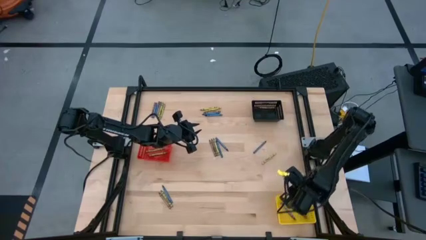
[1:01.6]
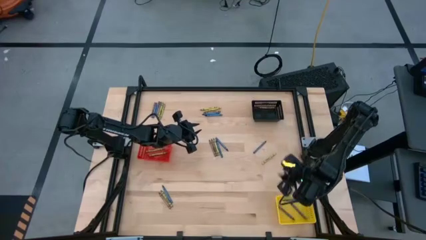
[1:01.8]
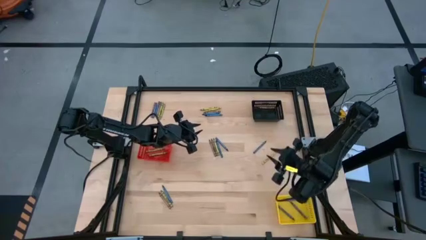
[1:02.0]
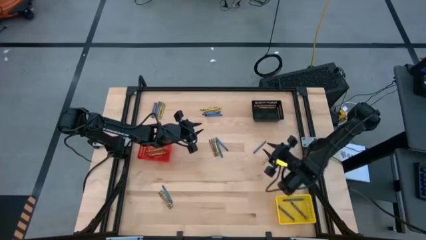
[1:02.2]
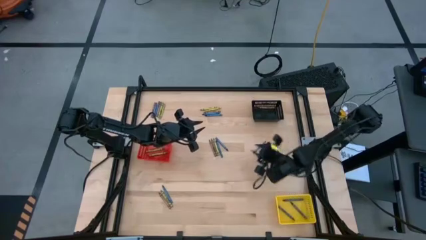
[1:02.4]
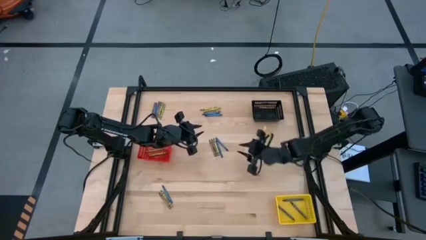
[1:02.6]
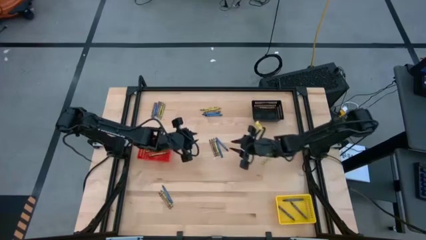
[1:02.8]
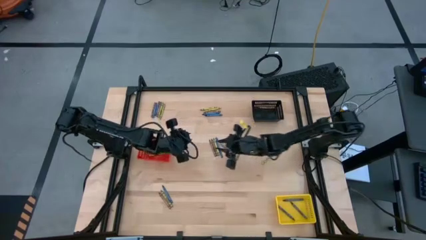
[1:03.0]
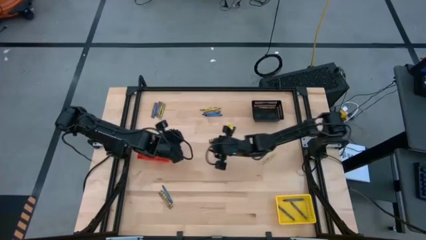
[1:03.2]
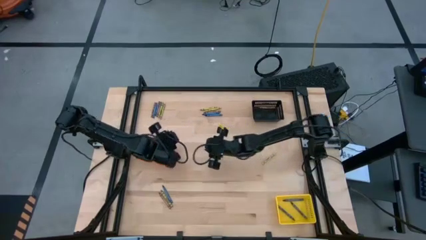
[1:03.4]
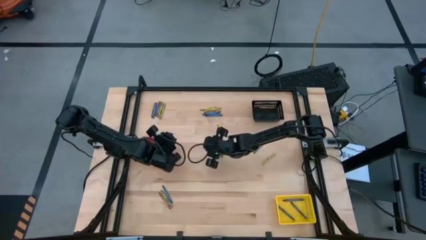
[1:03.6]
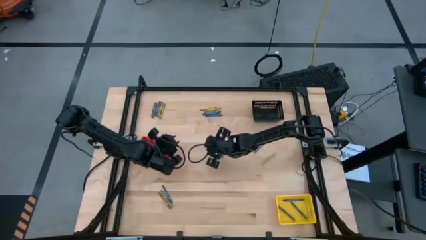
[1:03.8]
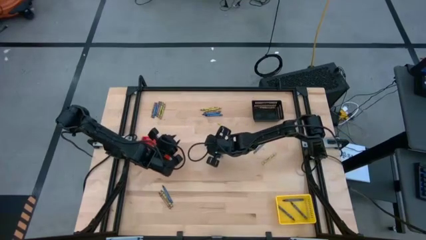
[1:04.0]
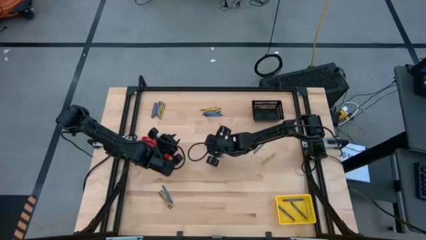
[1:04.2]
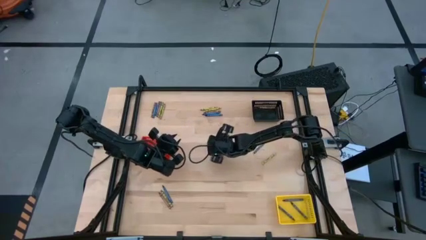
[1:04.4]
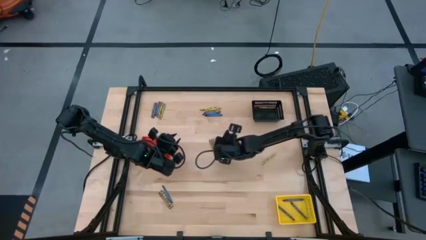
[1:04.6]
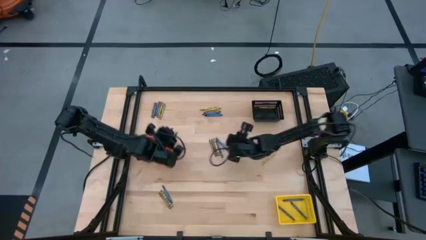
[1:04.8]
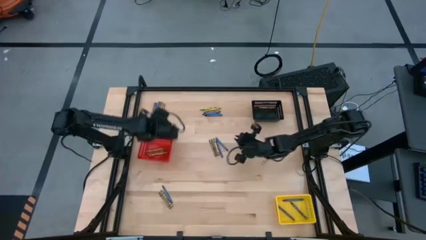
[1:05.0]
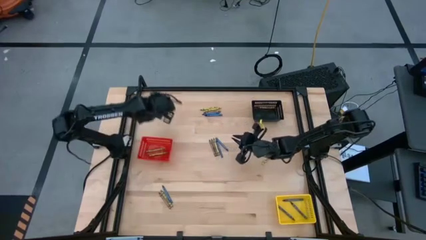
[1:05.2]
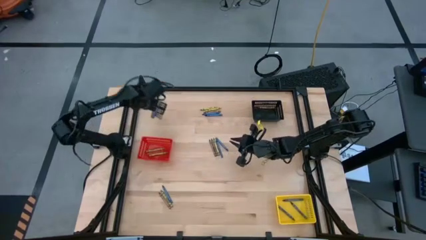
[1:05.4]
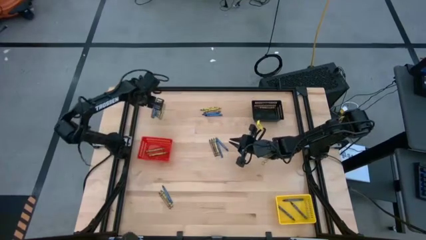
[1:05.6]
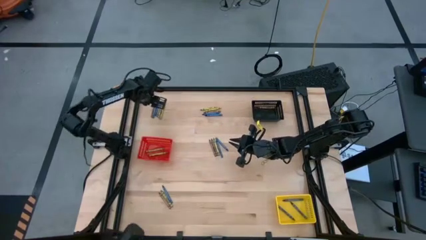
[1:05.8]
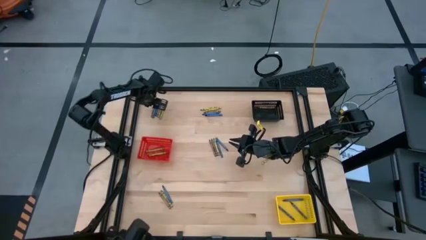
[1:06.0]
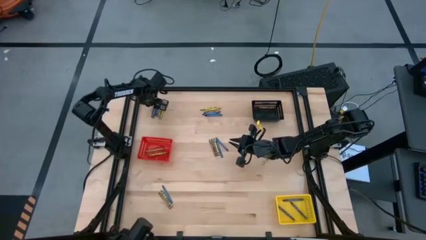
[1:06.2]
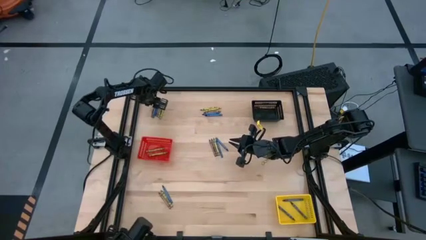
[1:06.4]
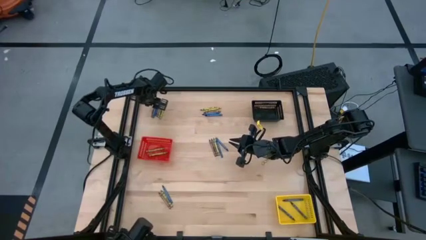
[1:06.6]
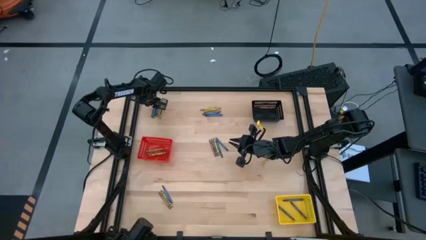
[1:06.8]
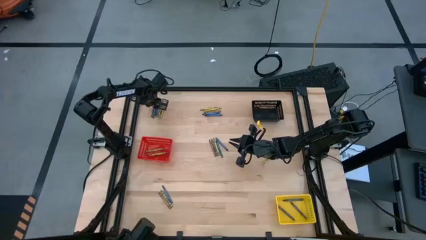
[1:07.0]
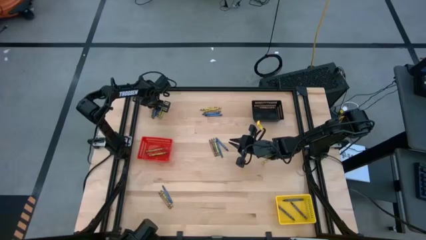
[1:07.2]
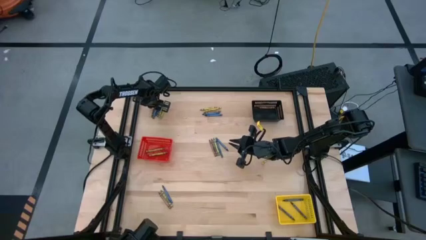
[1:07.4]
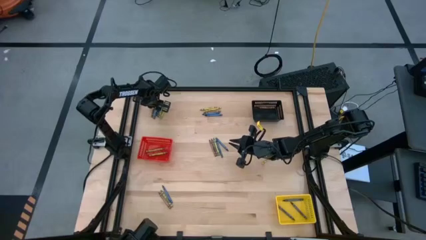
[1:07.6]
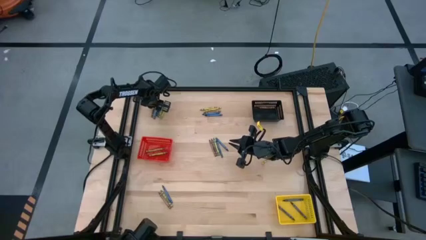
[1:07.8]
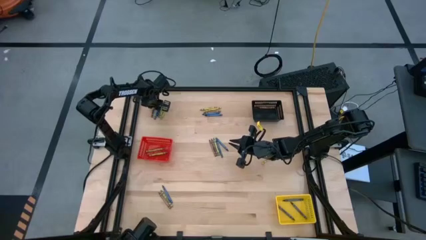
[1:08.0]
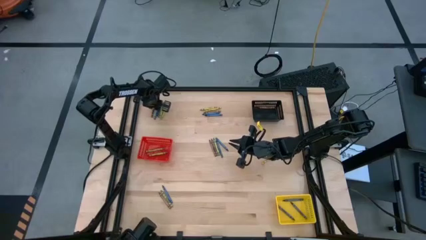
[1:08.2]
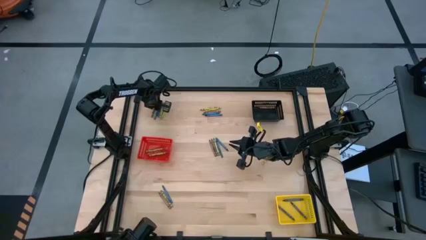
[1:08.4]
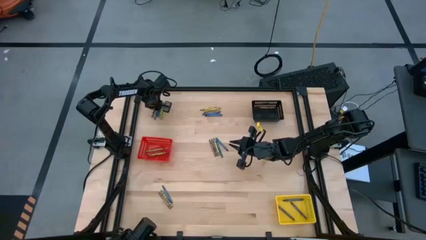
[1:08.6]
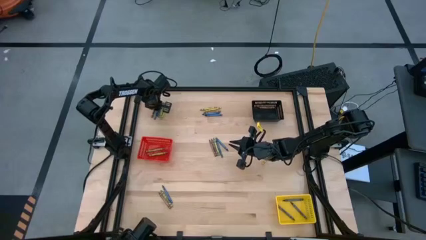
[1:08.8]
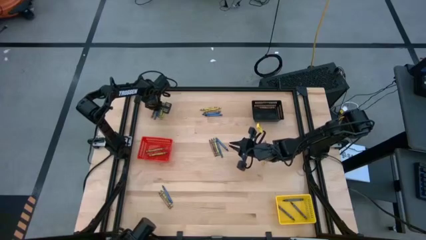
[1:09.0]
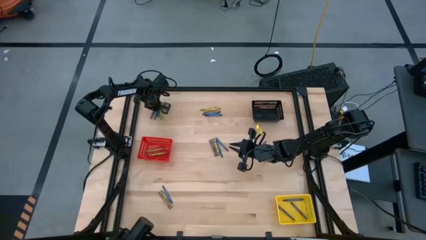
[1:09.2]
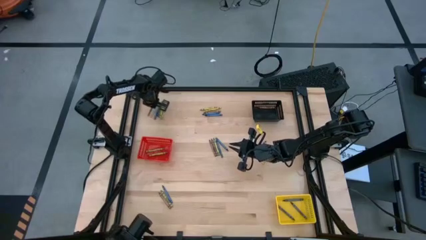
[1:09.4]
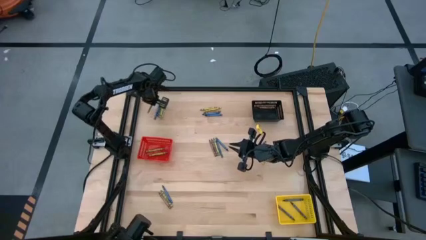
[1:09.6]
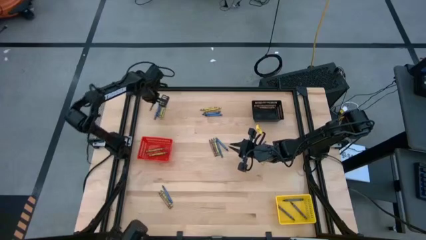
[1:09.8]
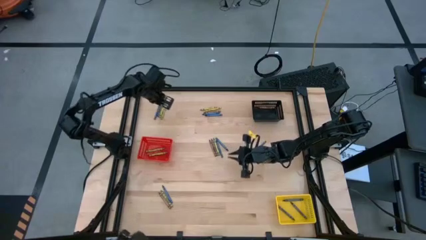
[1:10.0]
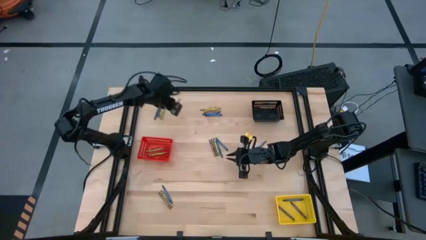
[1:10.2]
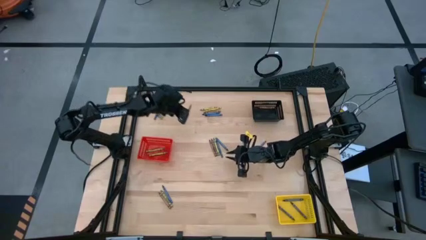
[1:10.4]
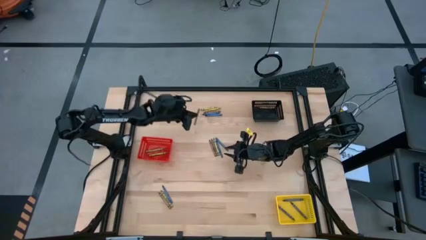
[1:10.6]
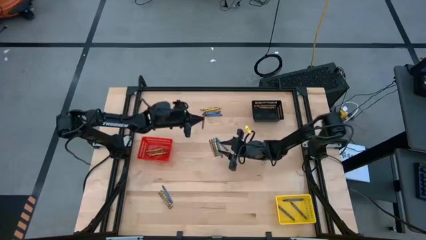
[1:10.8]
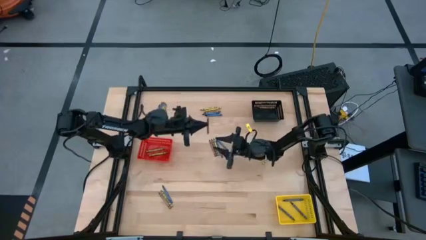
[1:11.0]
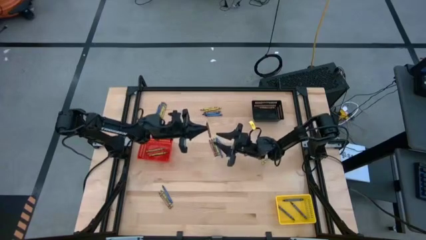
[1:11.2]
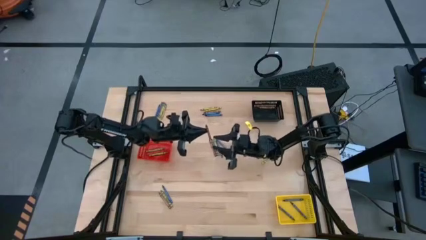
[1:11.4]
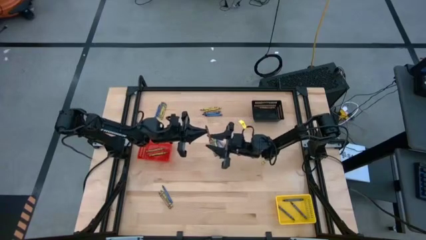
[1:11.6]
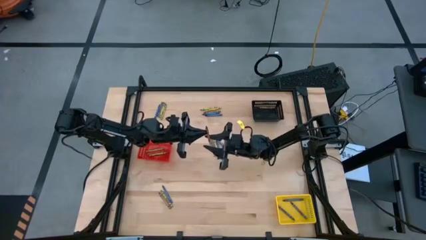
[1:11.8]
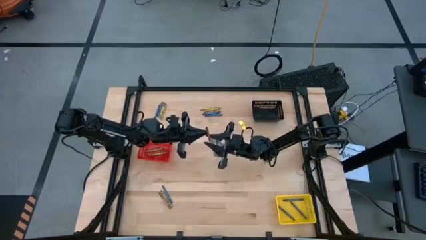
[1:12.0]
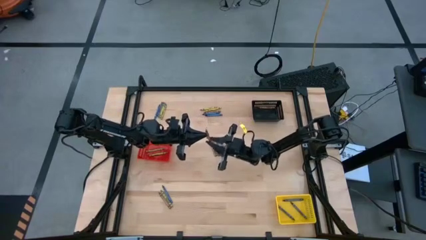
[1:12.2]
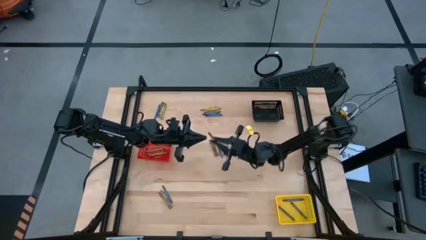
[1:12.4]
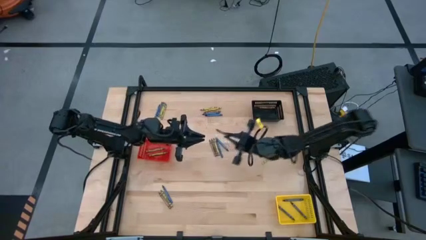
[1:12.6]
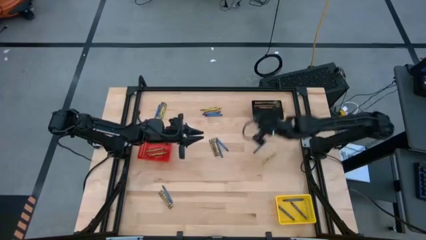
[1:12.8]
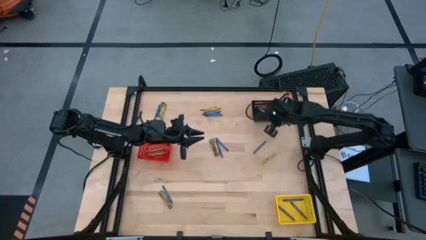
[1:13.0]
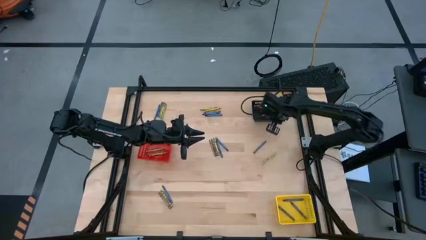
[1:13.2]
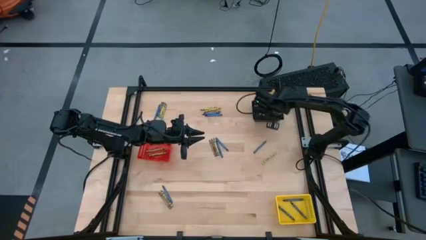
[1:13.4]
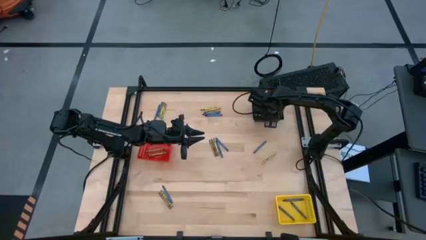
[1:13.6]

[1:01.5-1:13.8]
Task: Sort crayons
Put the brown crayon into the black bin

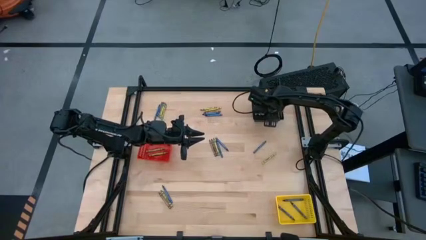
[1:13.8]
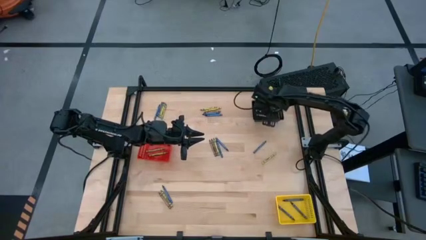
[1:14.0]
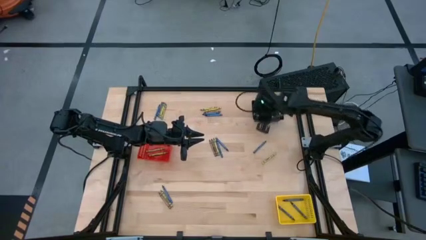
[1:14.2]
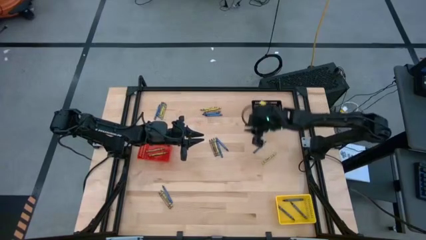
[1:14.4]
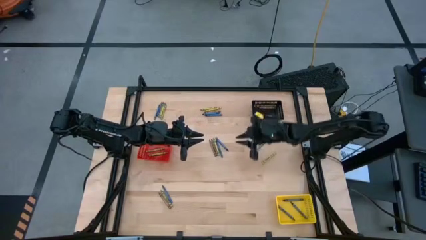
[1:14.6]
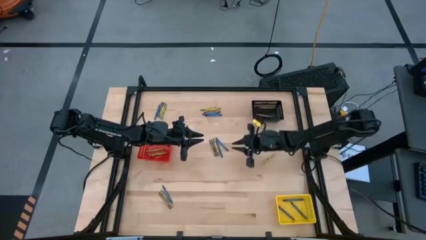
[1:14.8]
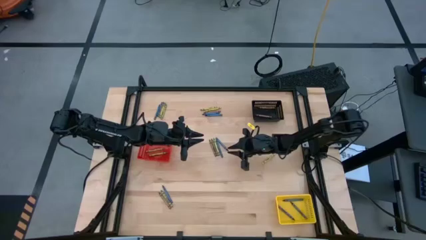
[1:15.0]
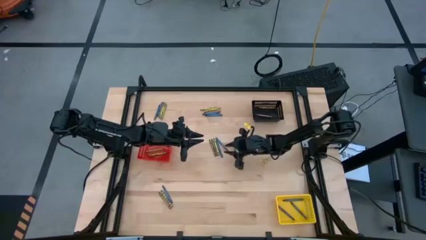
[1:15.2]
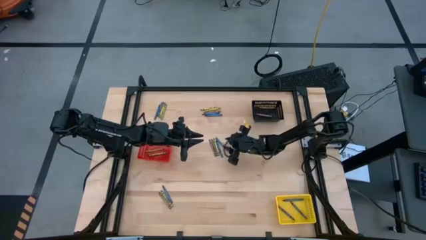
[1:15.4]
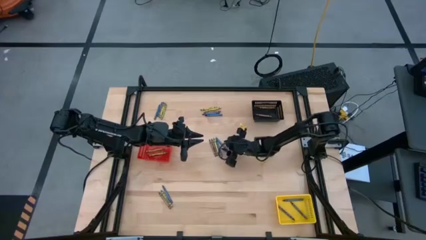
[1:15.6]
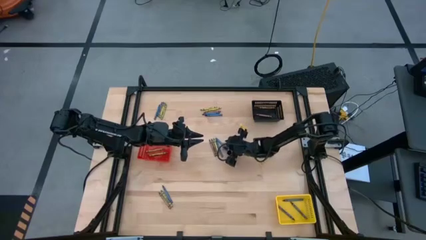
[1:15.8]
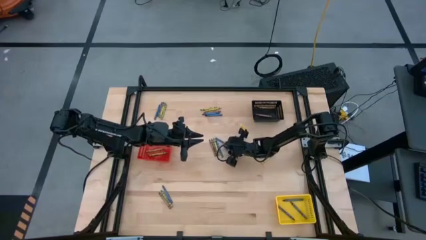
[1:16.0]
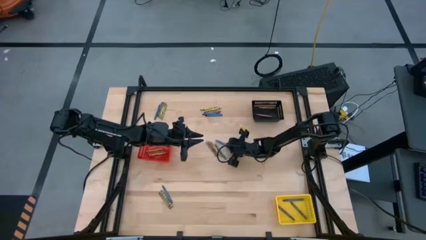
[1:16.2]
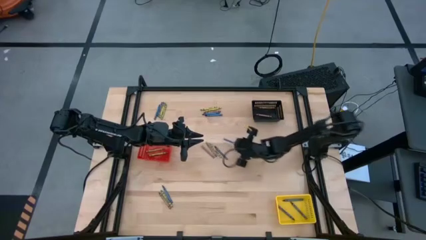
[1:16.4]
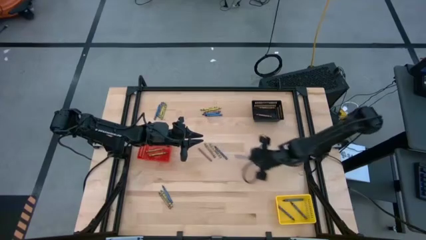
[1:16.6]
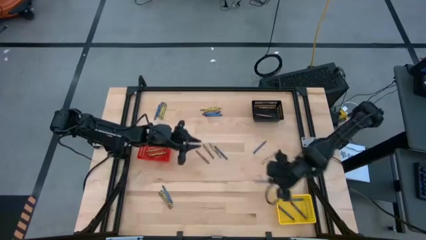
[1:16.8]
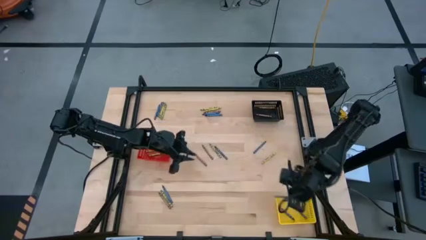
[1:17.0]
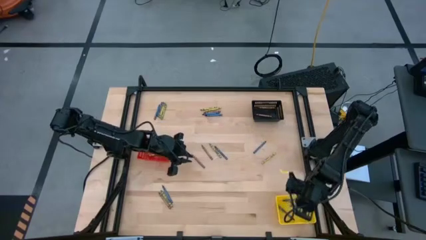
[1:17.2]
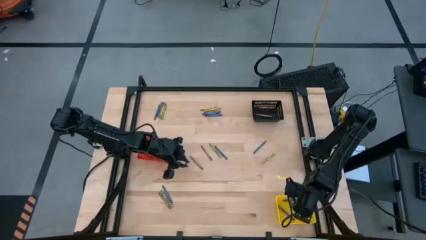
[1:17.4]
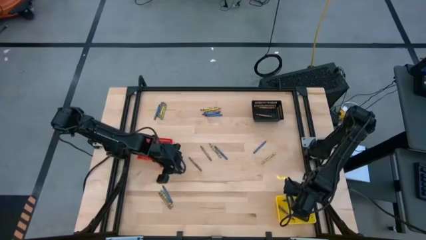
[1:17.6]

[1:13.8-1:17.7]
Put the blue crayon into the yellow bin
